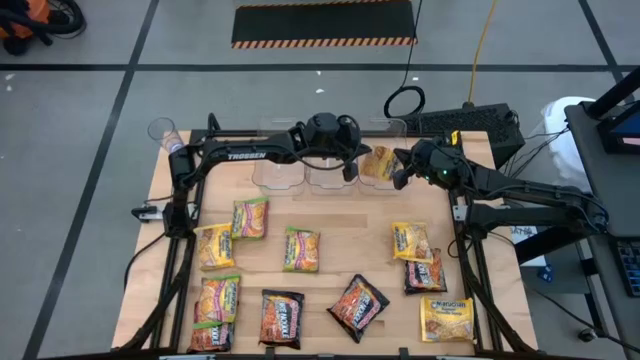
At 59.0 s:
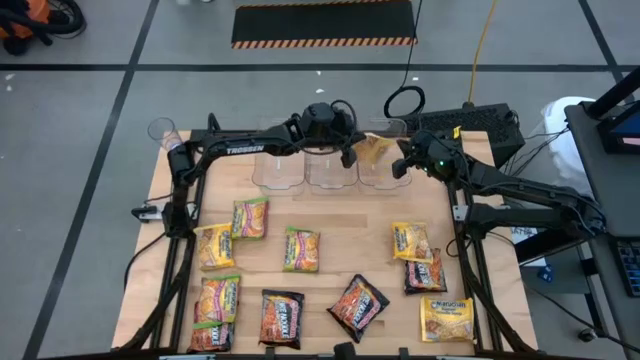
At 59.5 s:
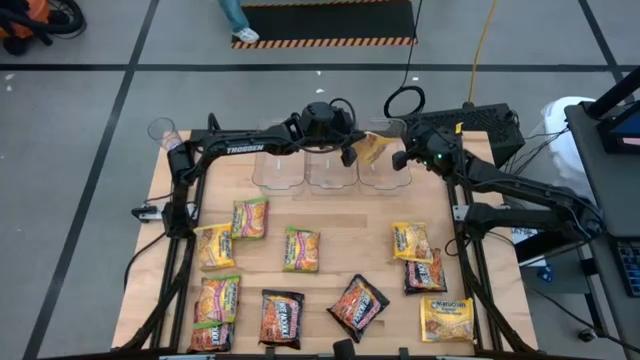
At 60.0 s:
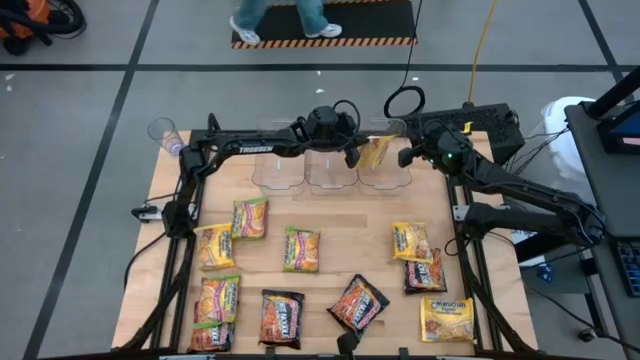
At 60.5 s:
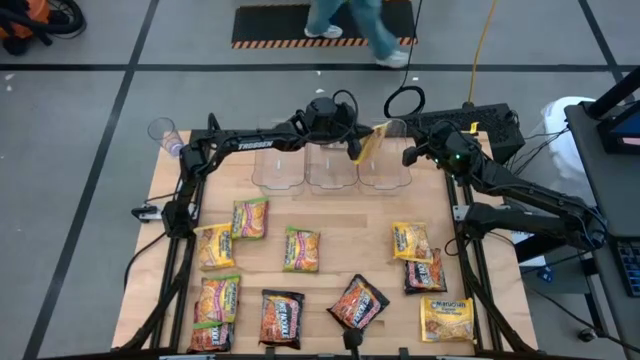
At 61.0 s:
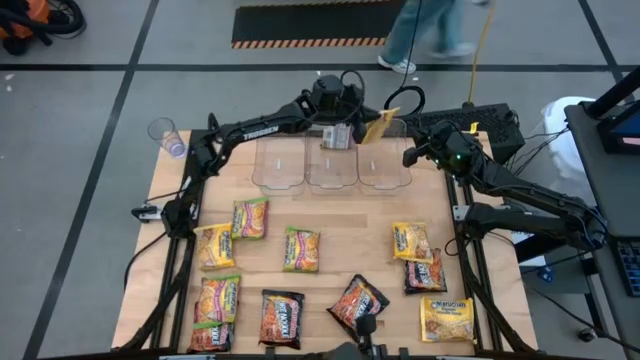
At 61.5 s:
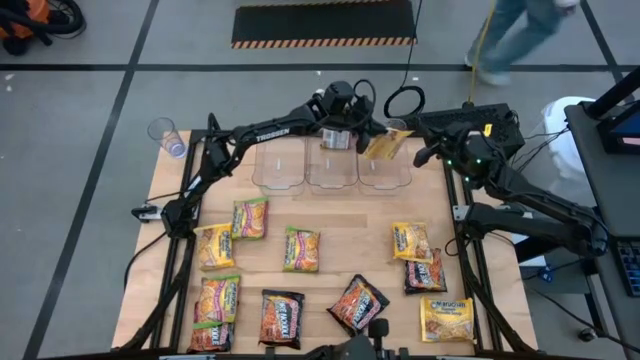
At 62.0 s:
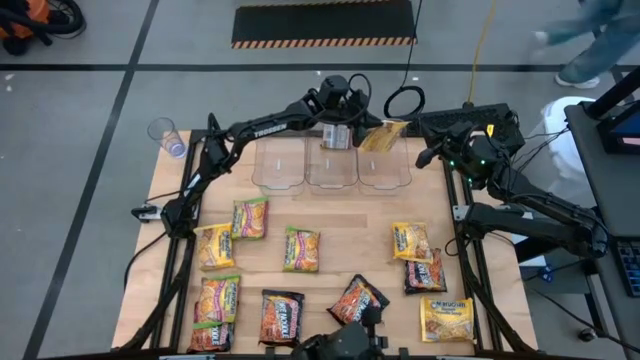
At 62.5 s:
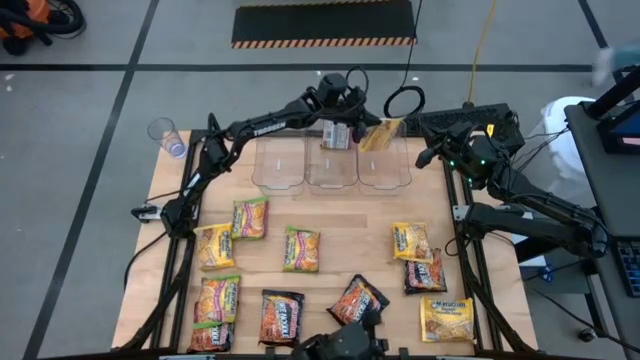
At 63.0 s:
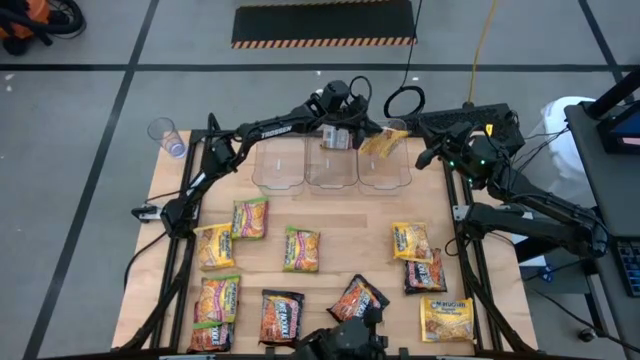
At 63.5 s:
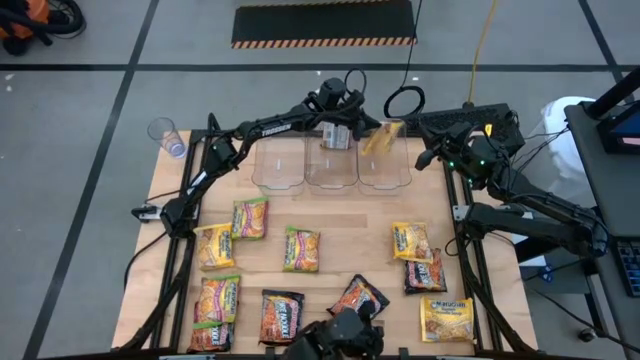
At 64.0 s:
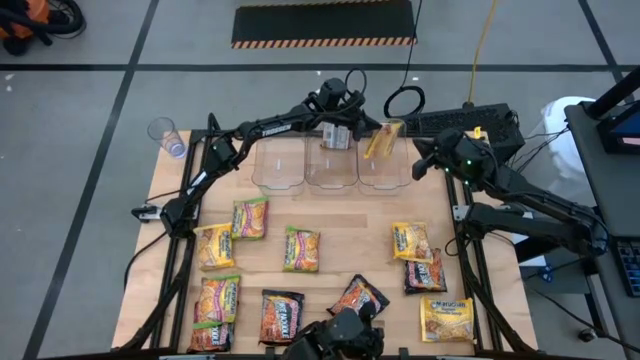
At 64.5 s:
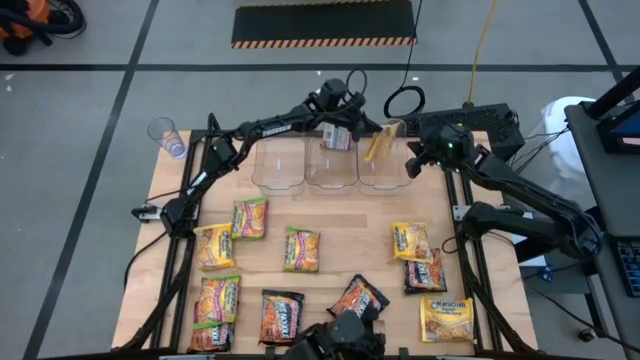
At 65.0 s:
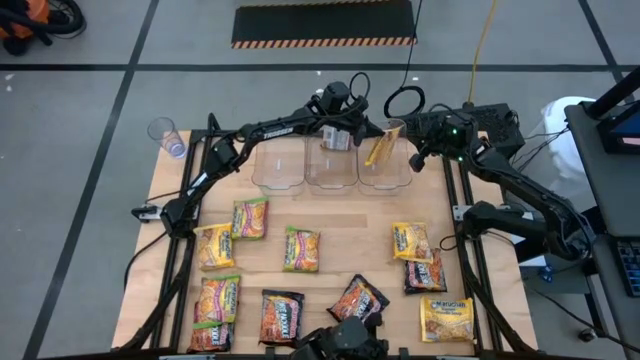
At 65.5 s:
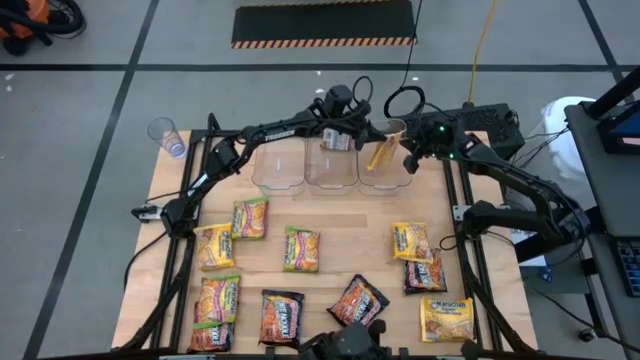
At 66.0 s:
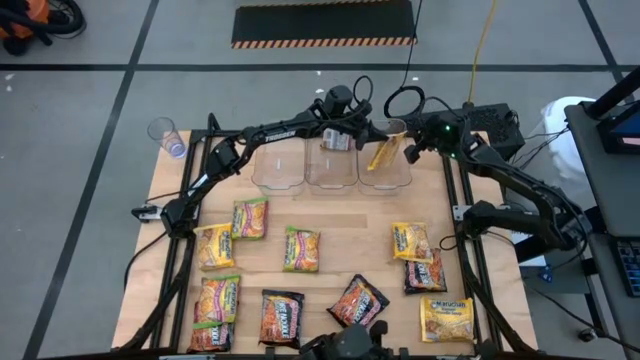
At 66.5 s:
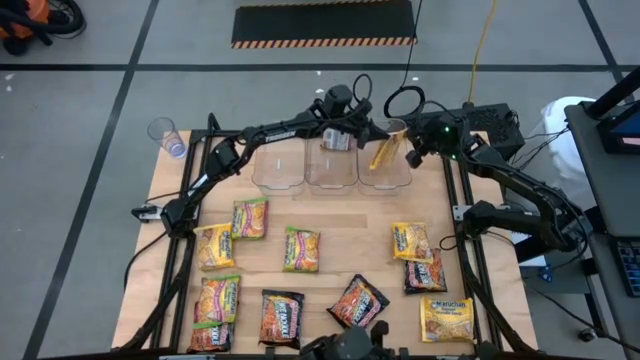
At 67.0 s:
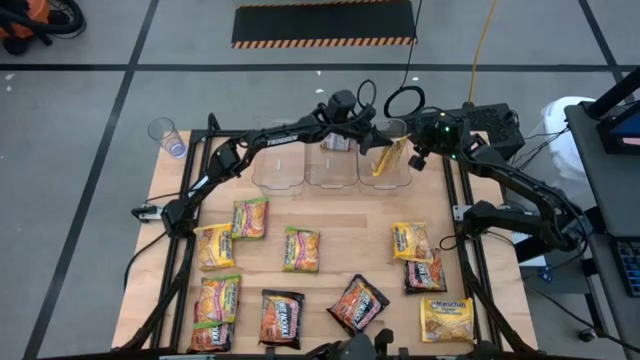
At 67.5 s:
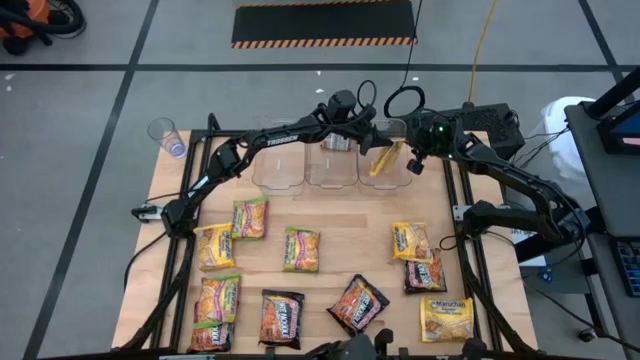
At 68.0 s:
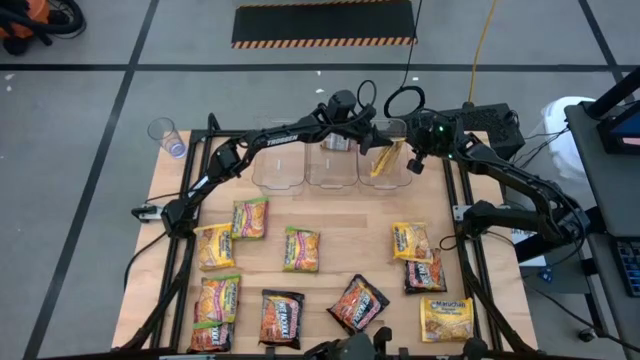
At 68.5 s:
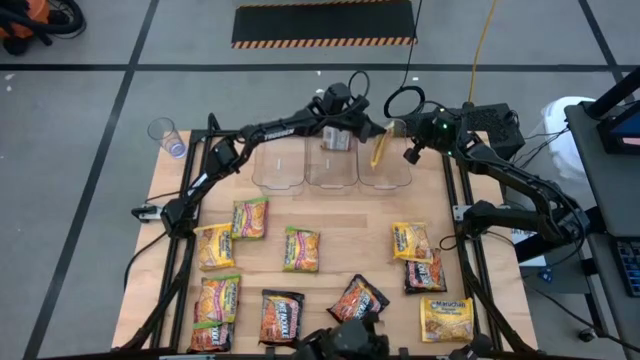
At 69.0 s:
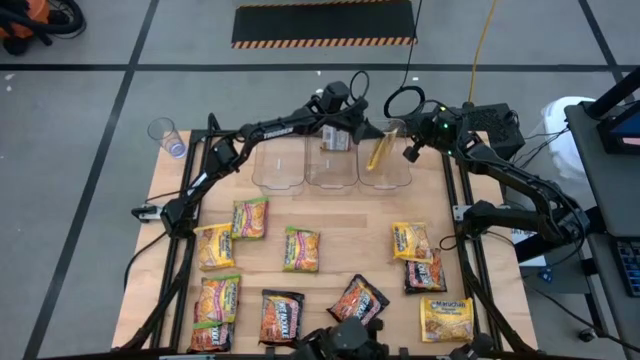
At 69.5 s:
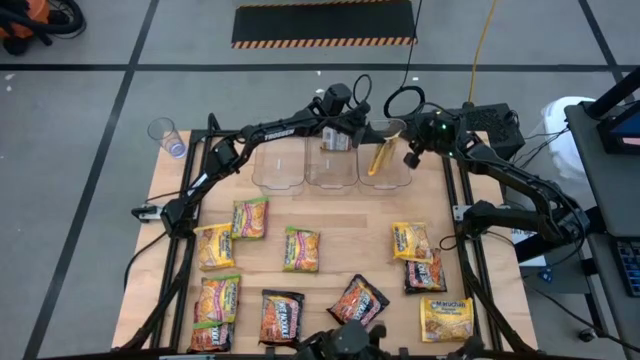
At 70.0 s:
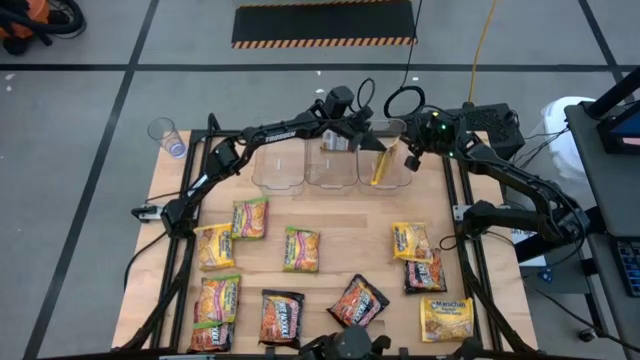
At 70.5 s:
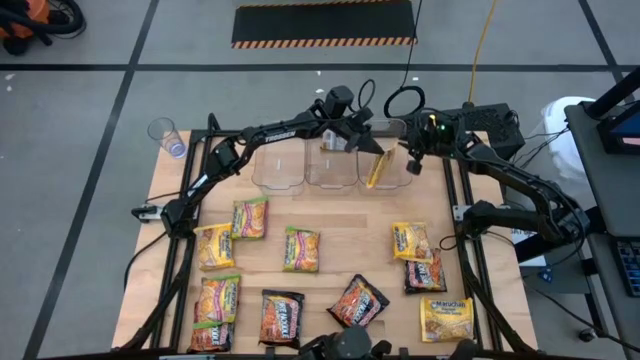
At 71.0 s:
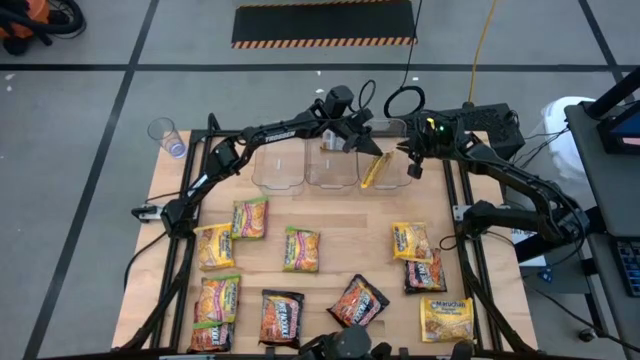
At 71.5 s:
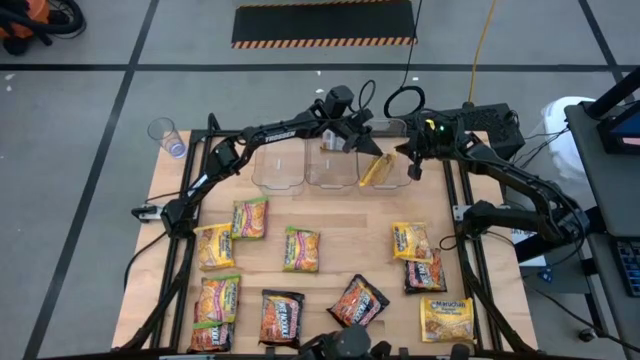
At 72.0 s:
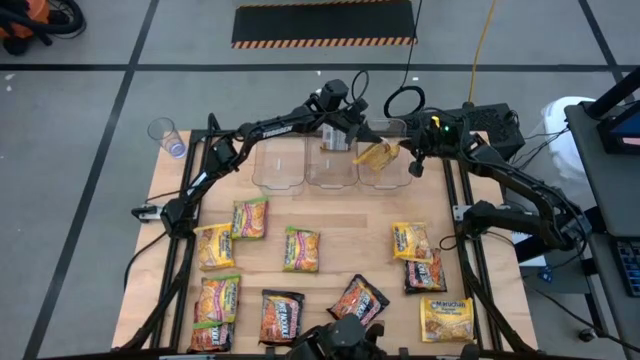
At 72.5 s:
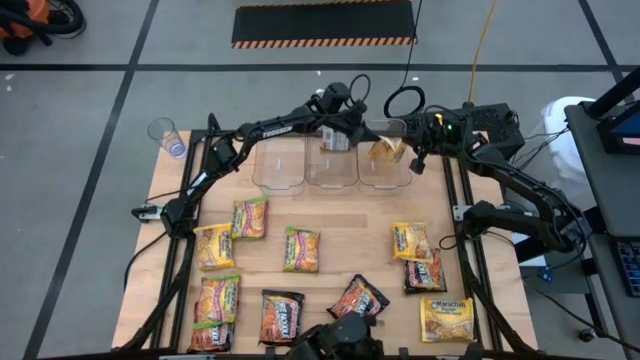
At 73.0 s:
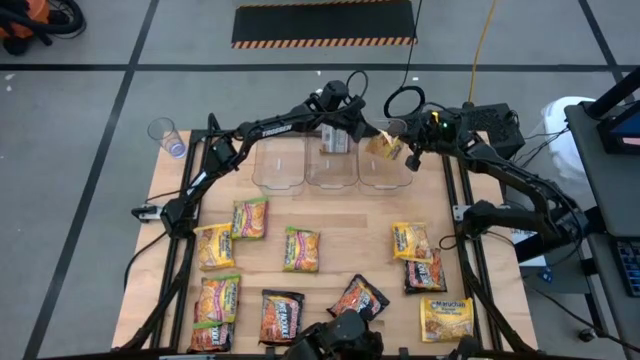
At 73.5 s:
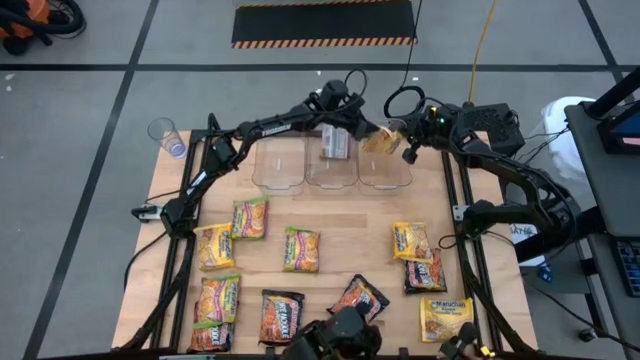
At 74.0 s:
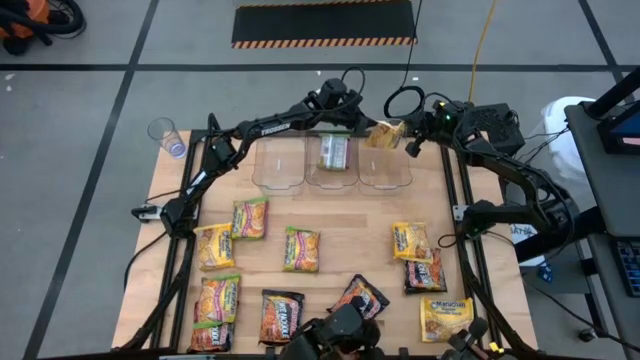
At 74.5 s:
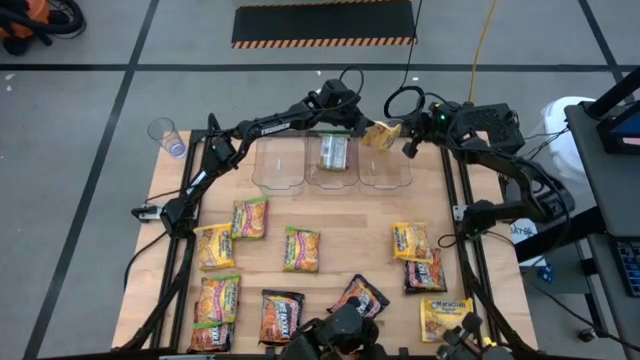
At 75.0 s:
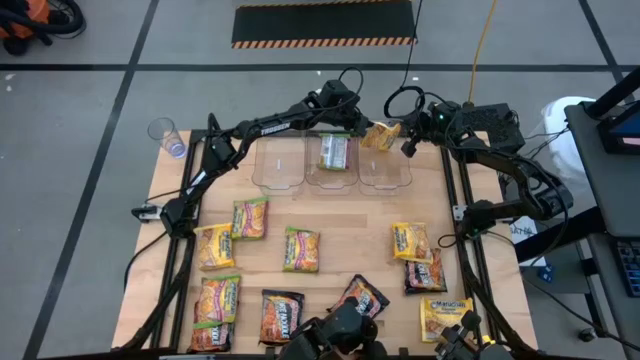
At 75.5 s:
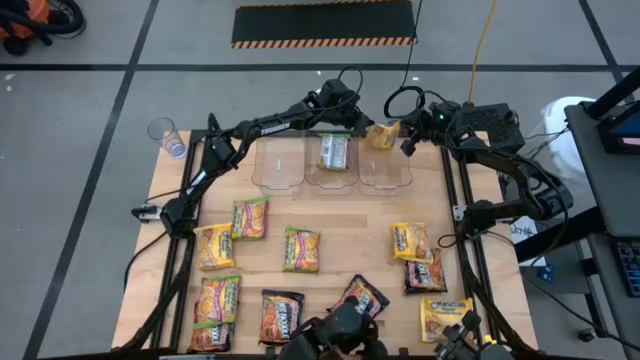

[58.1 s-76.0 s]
Task: Sort Maruchan noodles
Put the yellow noodle pack into the right transparent bin

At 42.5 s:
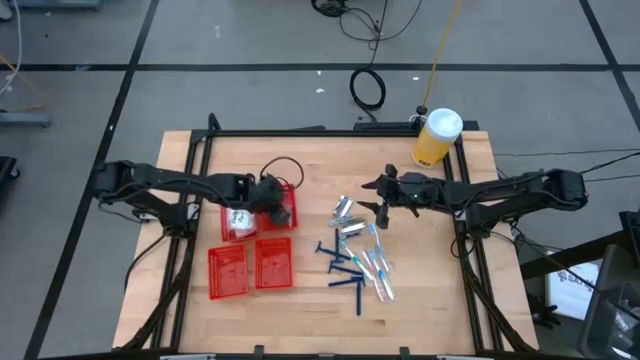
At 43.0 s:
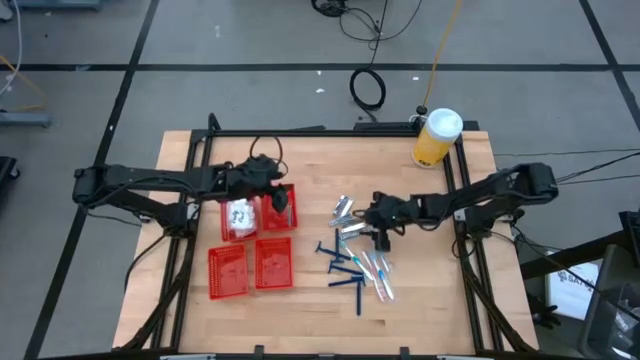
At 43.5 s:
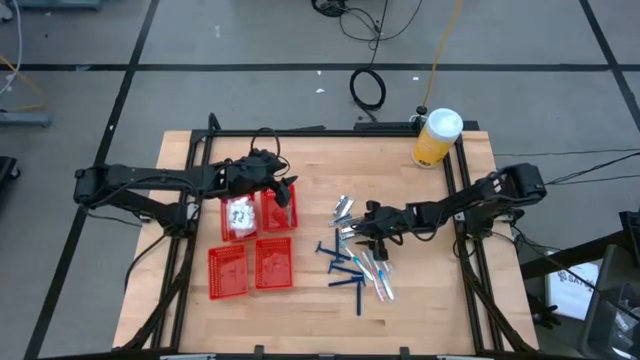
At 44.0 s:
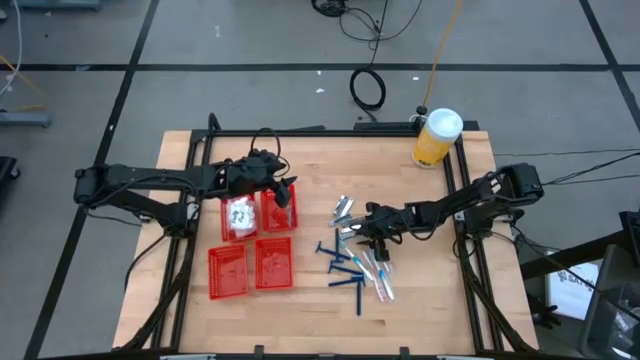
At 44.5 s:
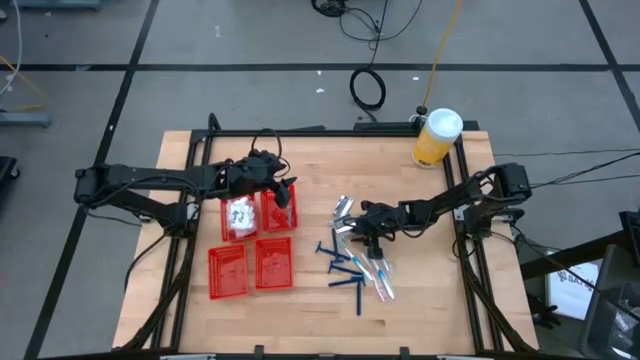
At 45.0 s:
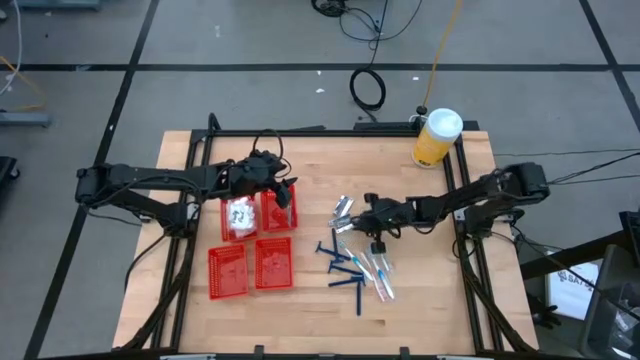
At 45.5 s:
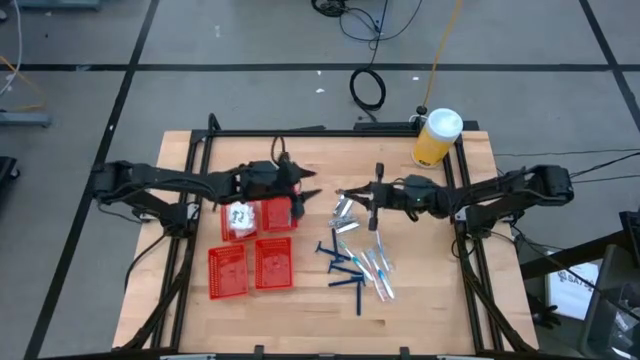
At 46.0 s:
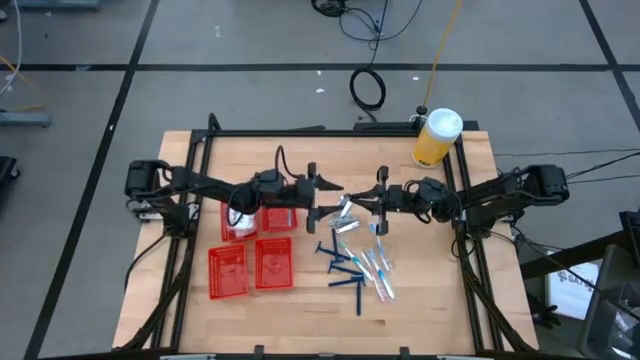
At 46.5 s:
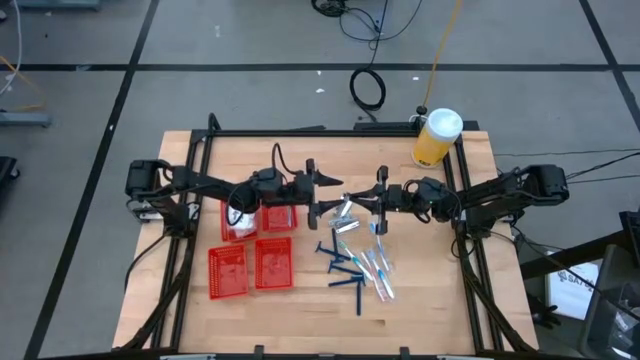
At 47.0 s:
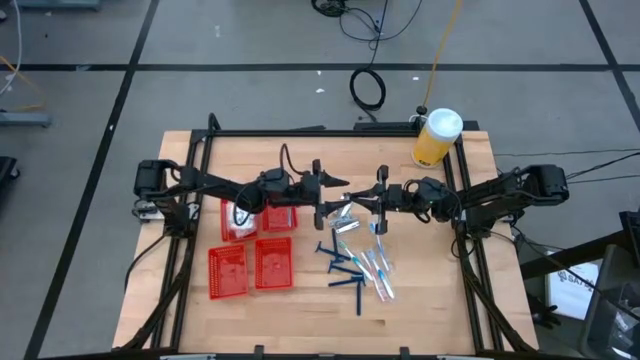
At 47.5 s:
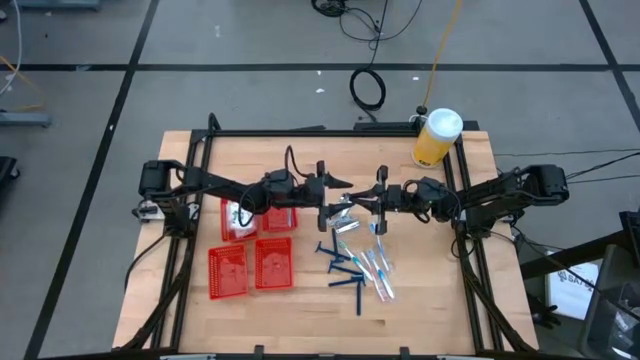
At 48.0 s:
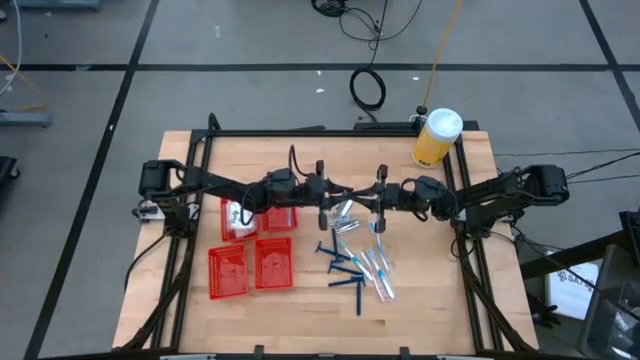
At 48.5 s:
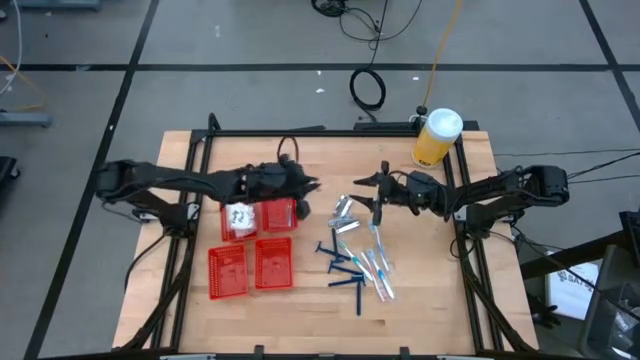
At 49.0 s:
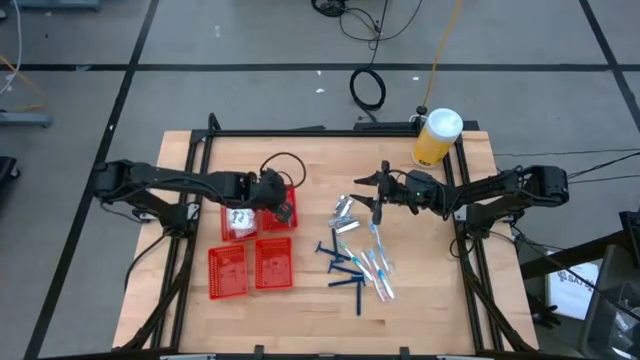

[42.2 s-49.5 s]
Task: Pick & Place Travel size toiletries
Put the silver nail cutter into the top right red basket
